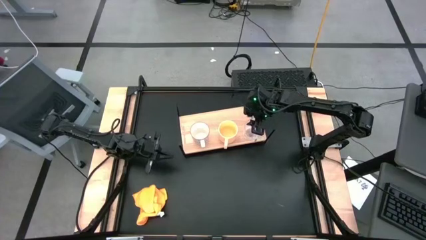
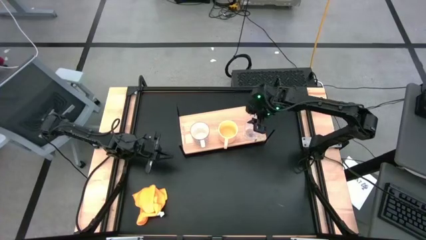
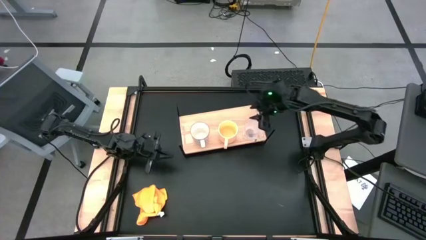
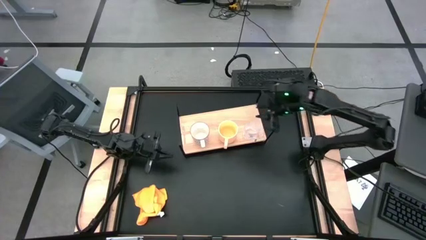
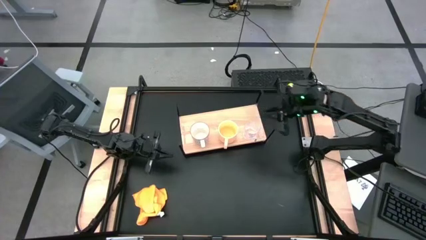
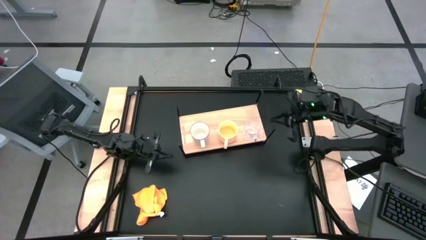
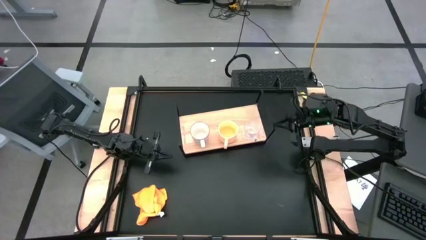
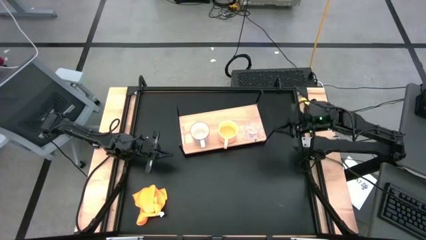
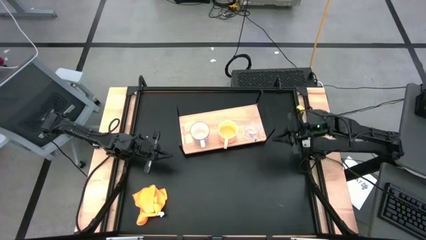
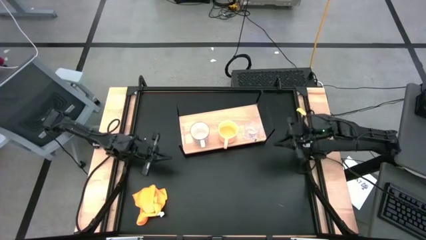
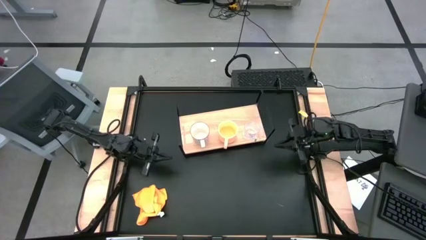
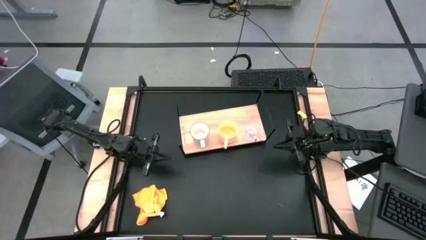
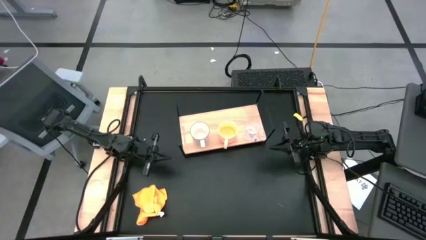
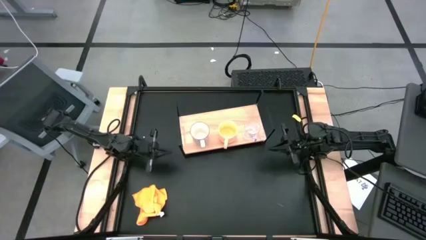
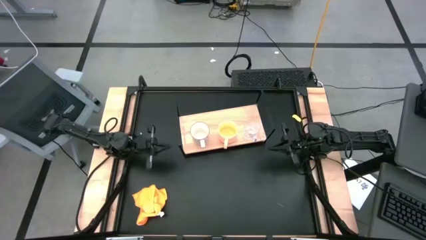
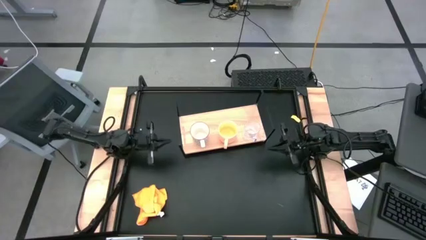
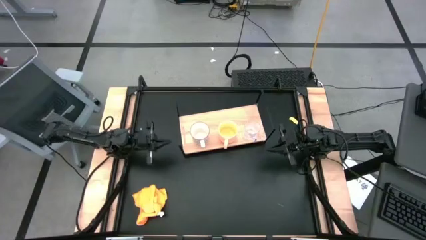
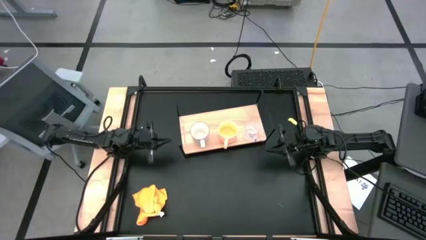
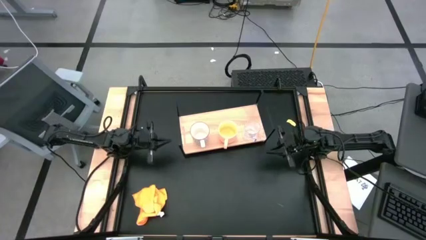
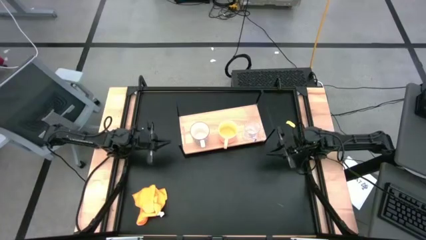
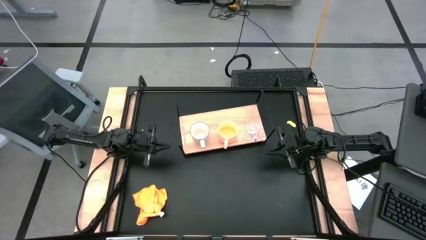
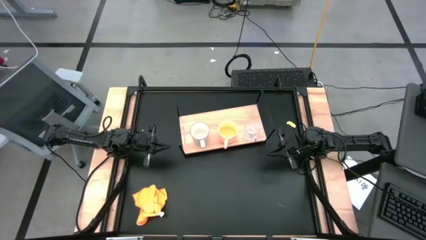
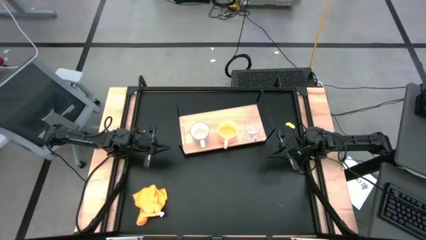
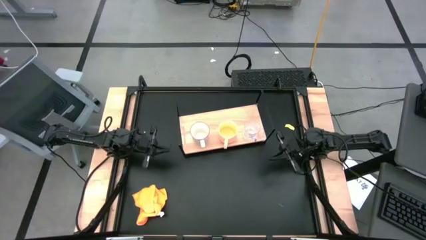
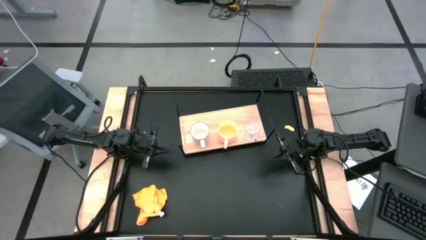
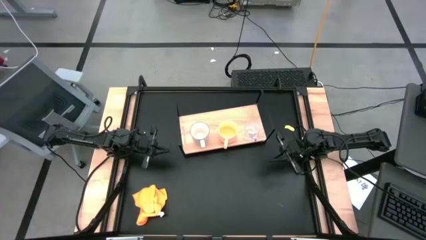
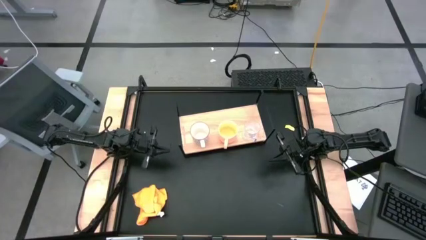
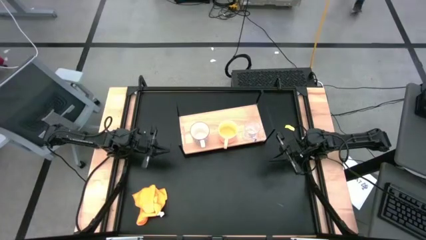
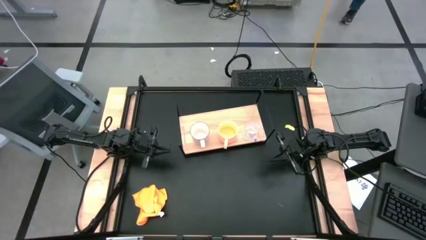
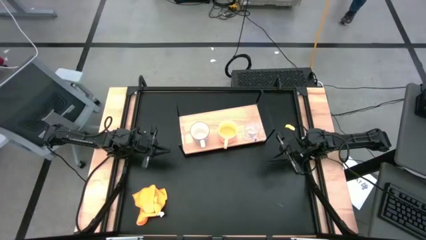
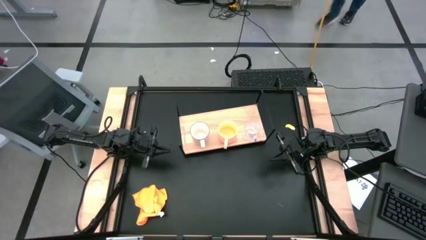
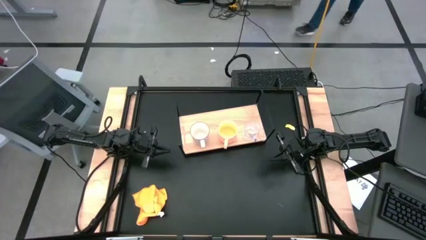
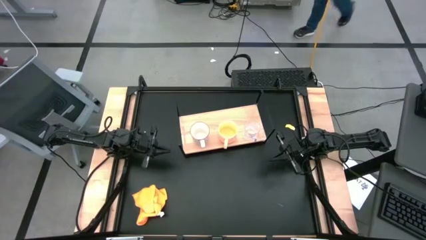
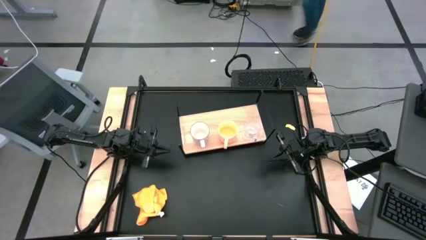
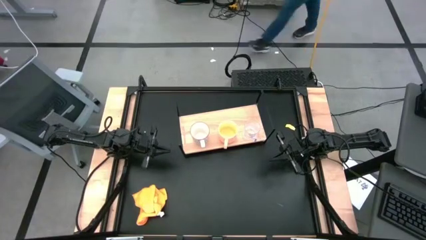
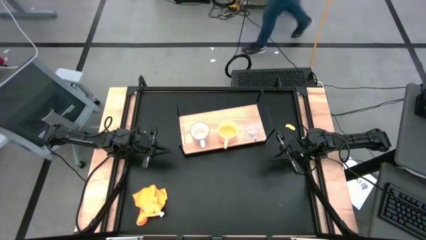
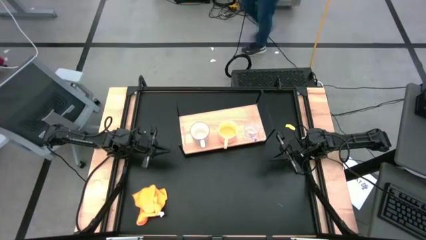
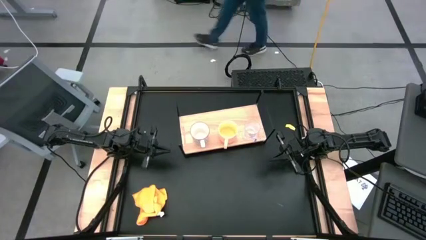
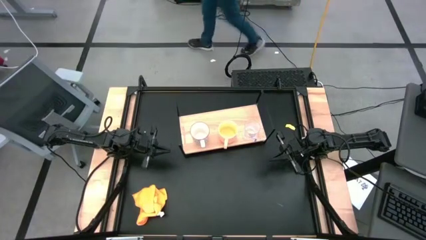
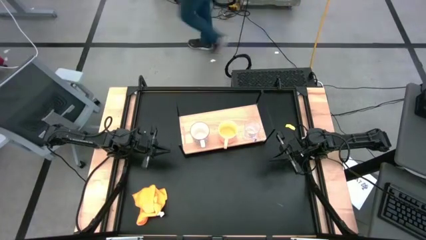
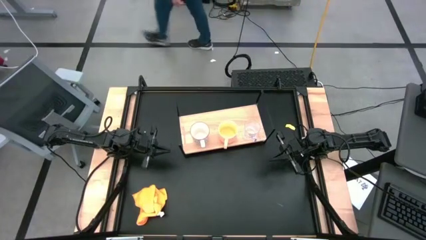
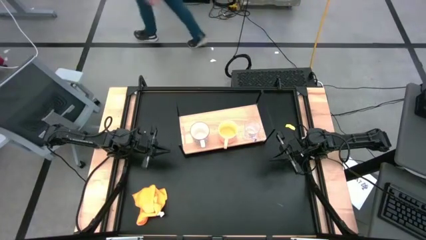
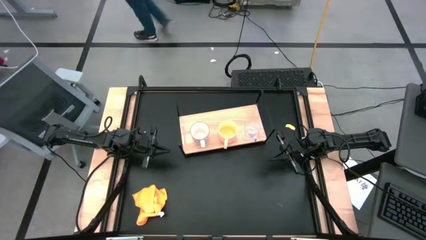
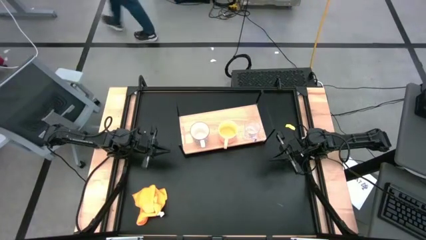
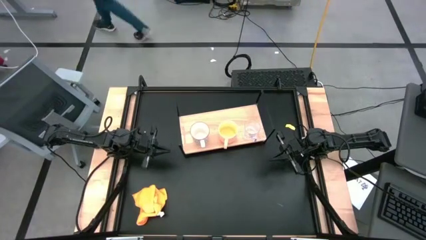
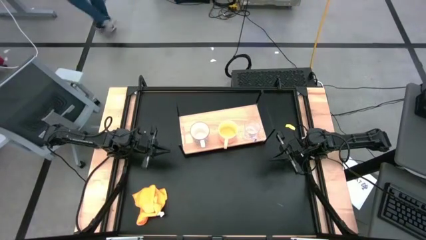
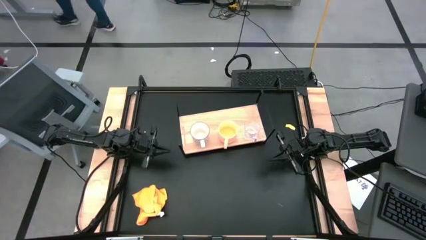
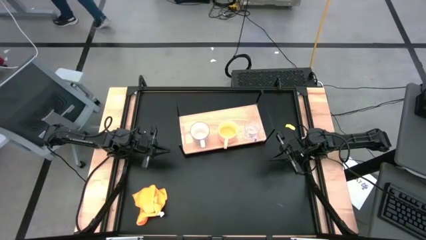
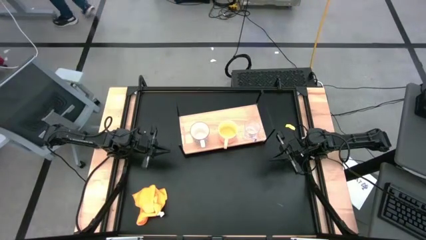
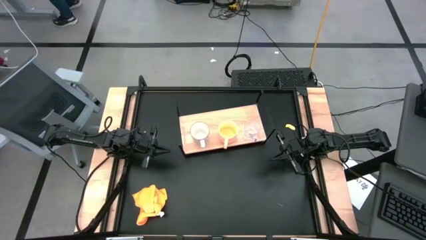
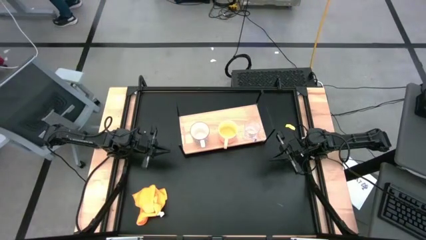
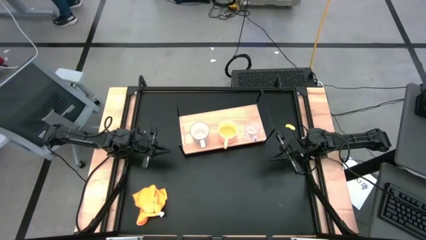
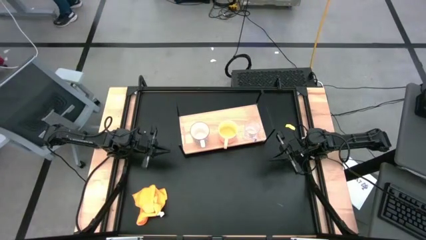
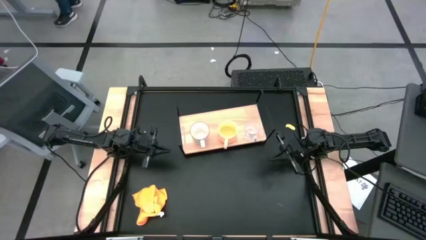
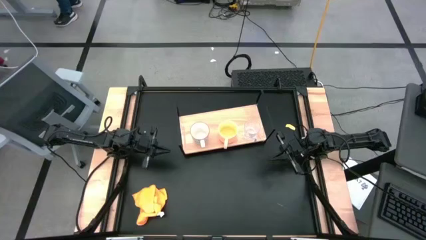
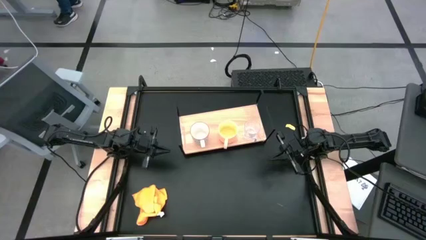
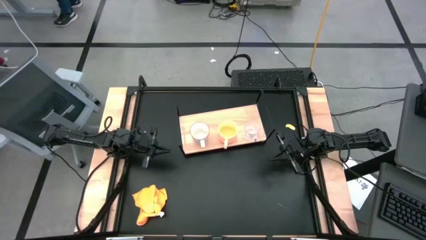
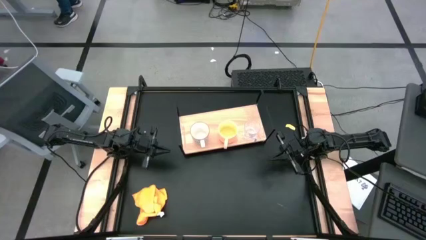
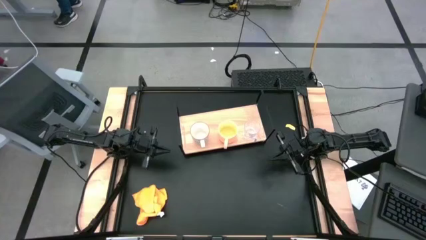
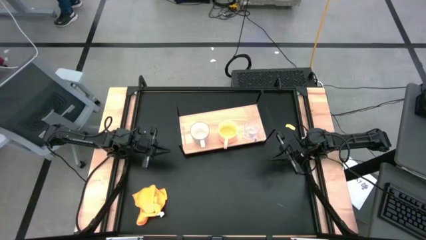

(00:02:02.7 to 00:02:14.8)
Task: Stack small to large cups/mugs on shelf
Return To Home Position
